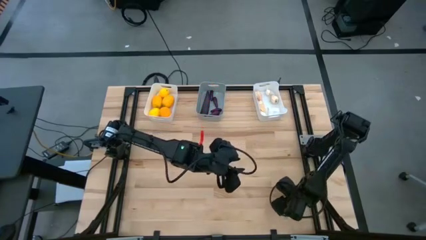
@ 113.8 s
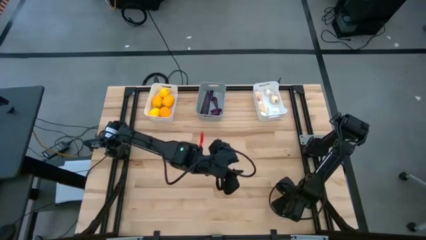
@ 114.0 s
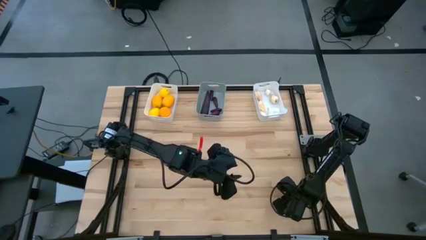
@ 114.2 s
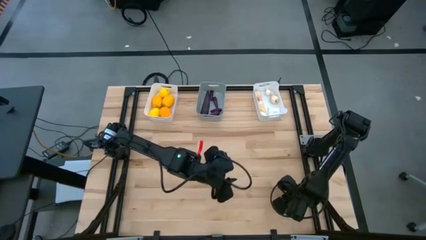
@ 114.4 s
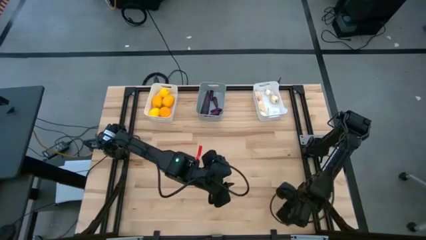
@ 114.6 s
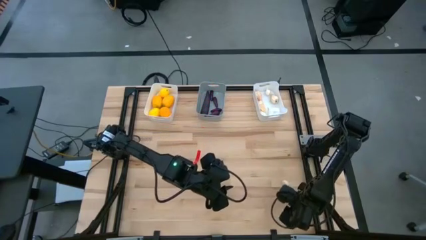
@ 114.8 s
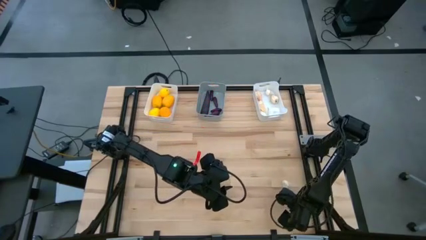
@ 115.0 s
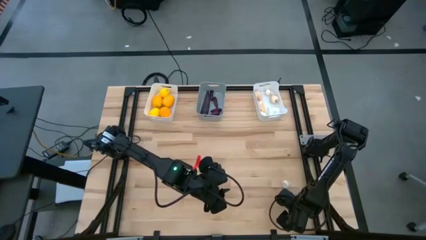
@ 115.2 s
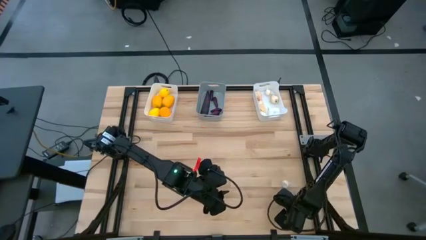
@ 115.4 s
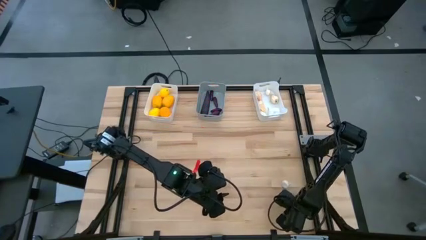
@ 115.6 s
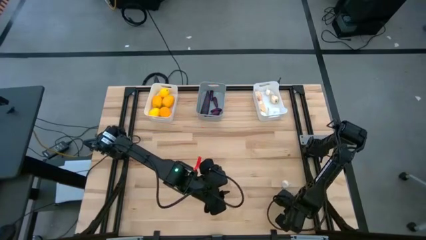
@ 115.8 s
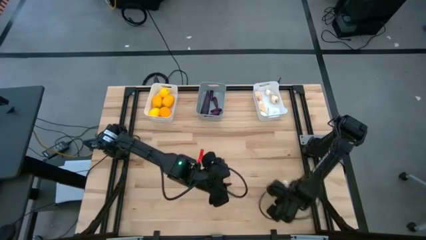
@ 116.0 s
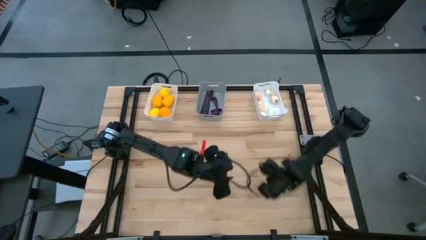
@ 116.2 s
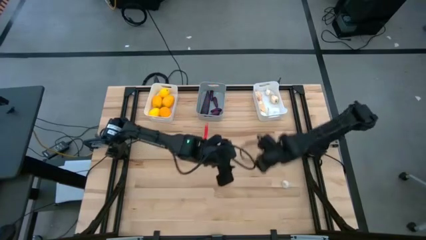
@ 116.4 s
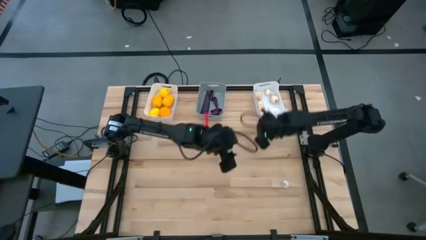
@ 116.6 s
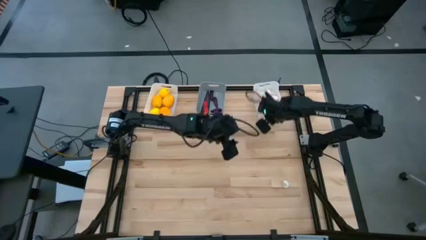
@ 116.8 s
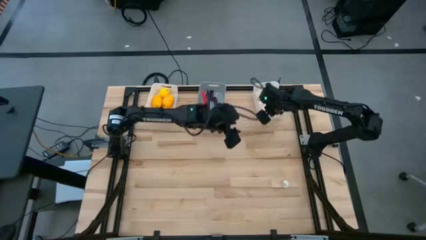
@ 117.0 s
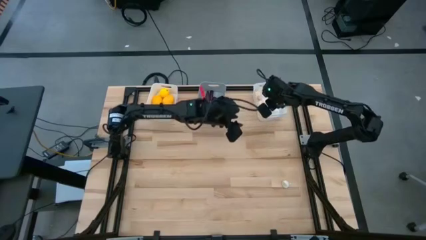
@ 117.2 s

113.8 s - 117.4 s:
Task: Sort produce into baskets
Put the garlic into the right white bin

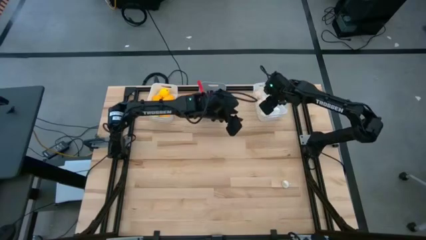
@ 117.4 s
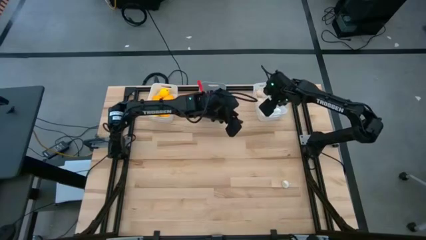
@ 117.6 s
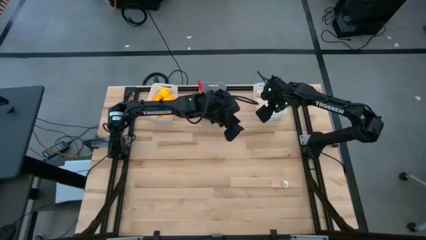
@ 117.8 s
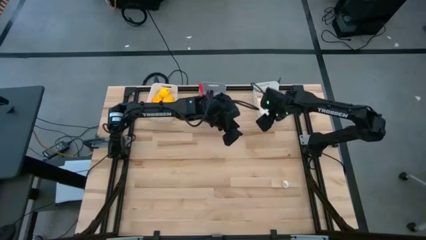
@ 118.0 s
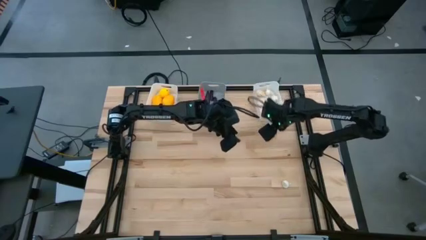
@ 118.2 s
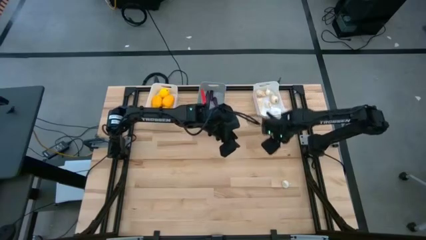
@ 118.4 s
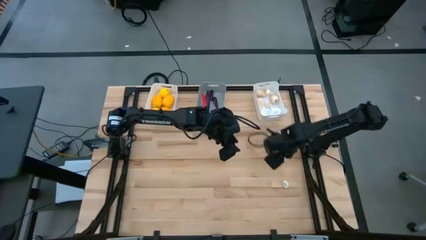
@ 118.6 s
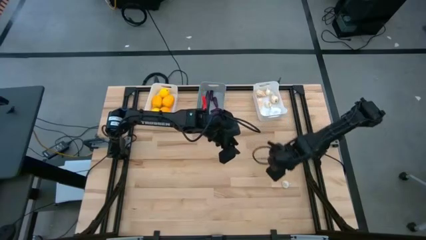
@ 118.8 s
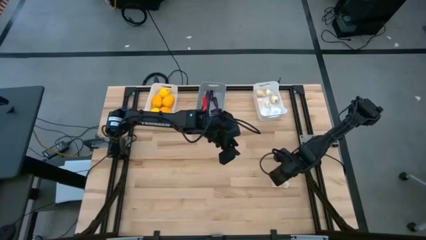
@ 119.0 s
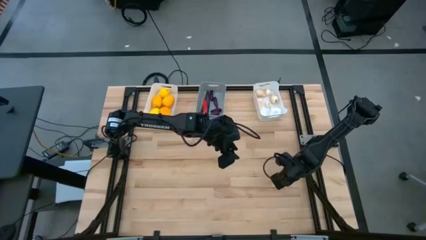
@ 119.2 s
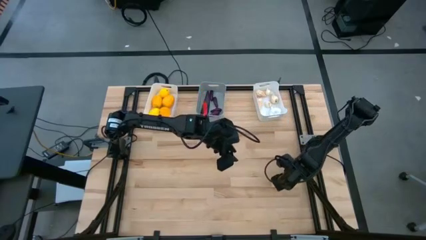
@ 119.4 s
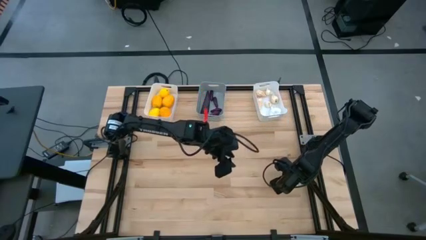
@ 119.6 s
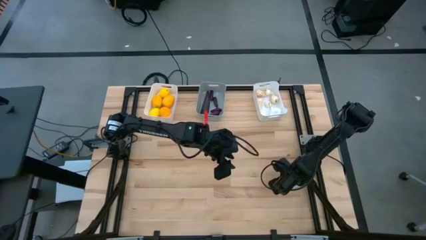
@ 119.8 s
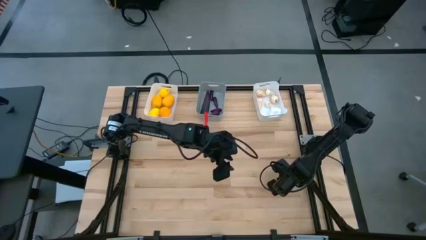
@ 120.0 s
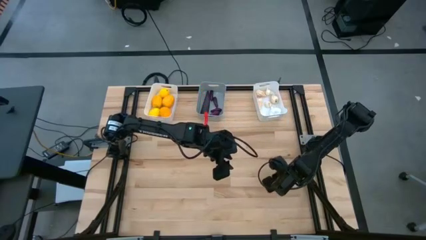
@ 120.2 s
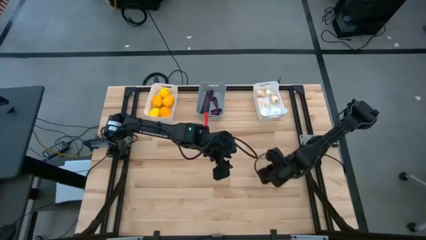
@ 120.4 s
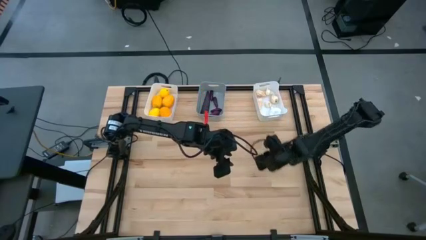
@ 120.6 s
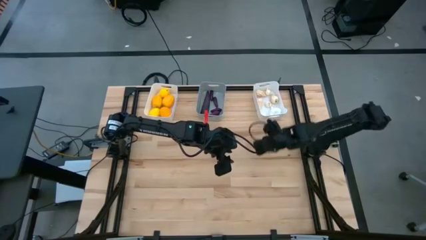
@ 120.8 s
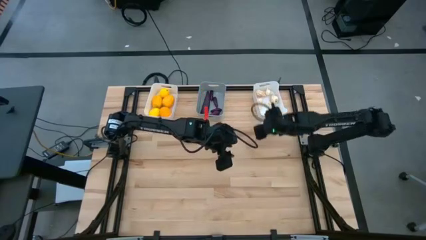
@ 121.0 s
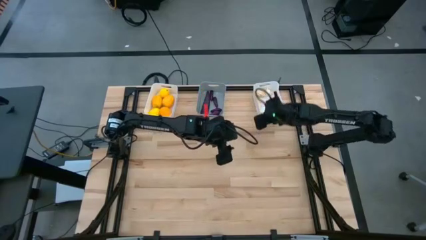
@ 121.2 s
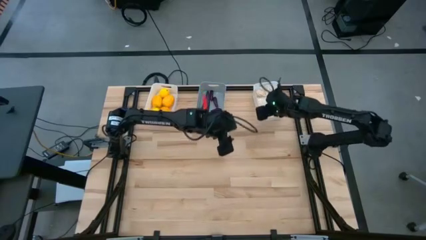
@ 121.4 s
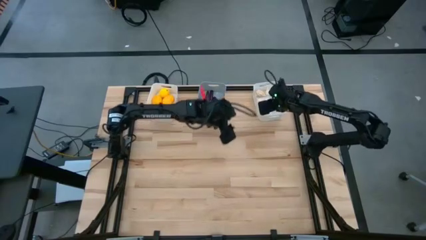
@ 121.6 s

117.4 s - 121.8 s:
Put the garlic into the right white bin

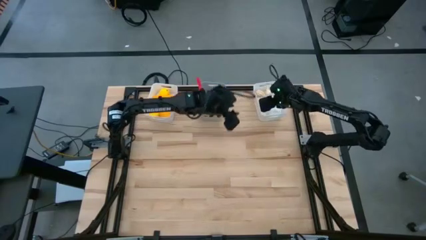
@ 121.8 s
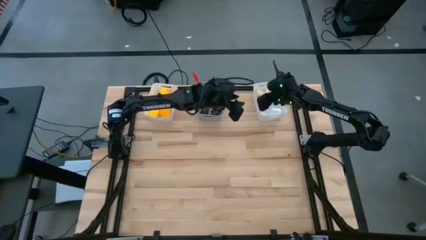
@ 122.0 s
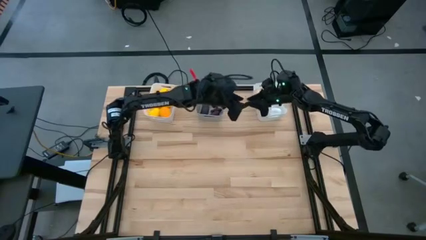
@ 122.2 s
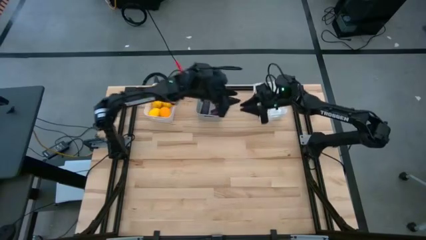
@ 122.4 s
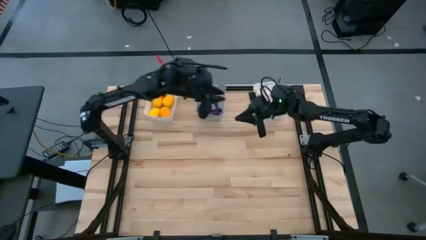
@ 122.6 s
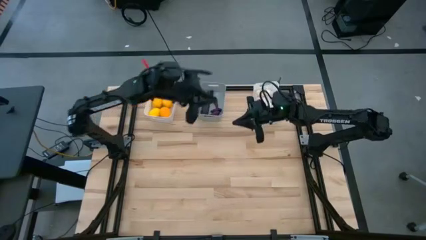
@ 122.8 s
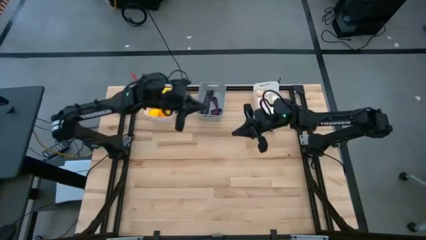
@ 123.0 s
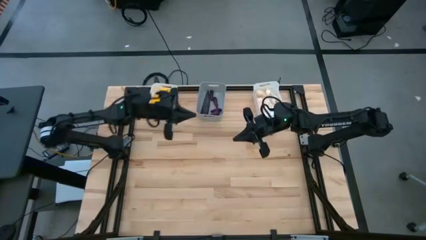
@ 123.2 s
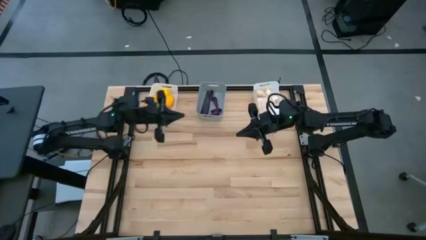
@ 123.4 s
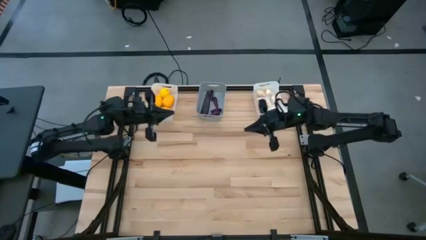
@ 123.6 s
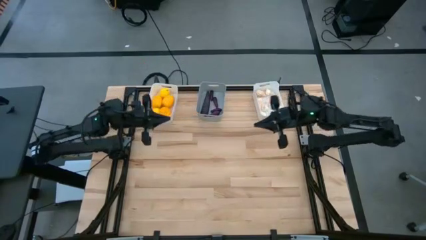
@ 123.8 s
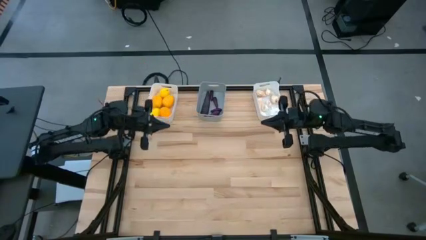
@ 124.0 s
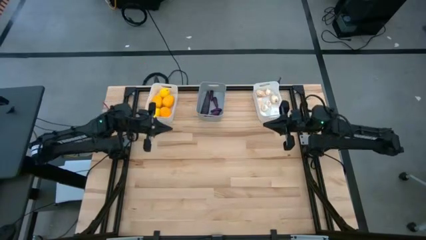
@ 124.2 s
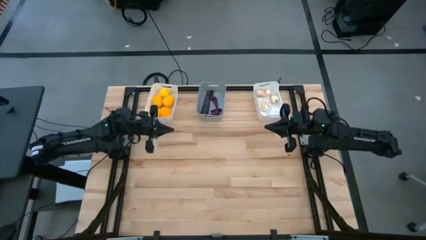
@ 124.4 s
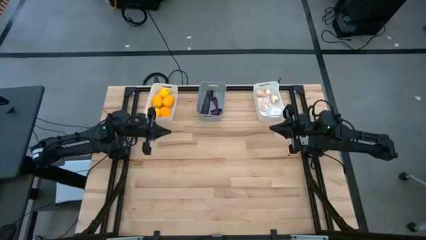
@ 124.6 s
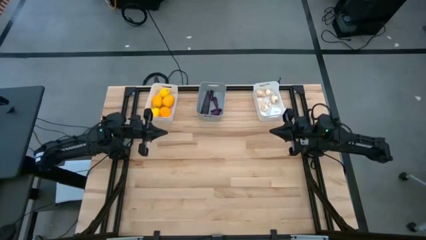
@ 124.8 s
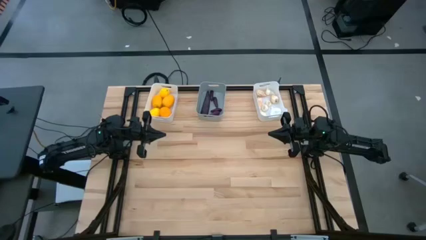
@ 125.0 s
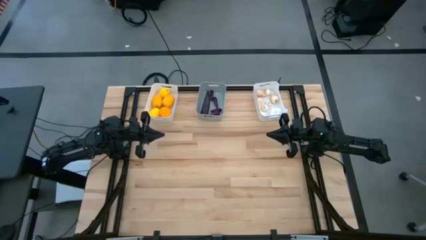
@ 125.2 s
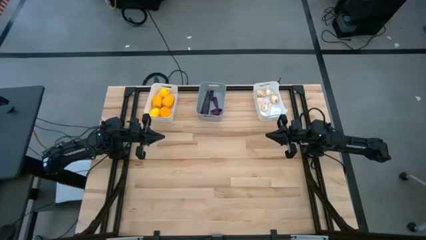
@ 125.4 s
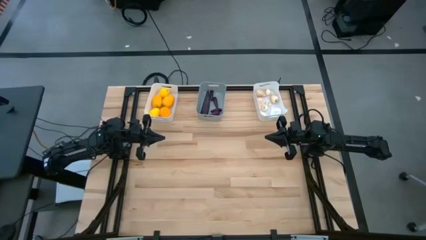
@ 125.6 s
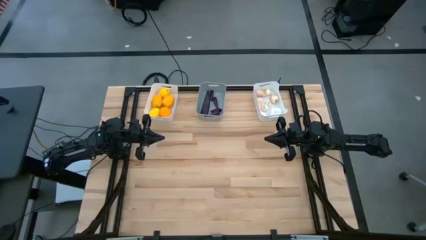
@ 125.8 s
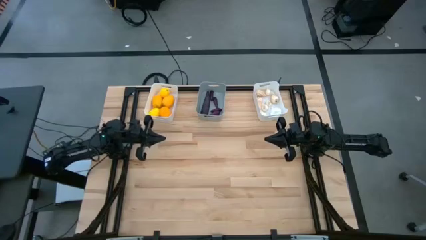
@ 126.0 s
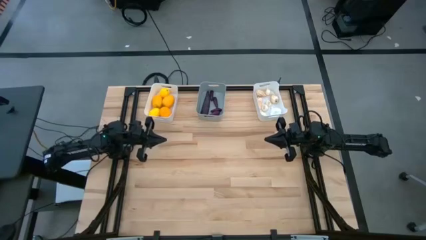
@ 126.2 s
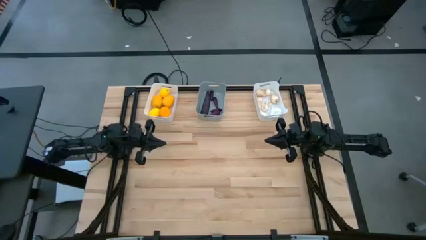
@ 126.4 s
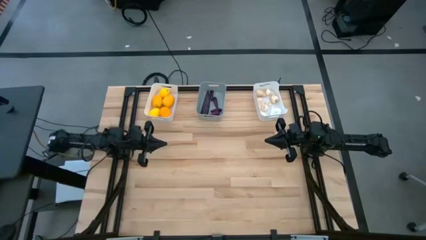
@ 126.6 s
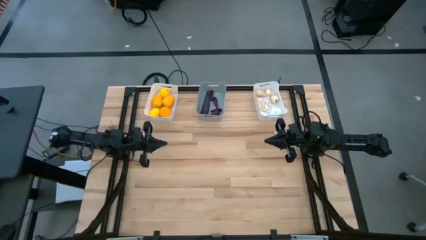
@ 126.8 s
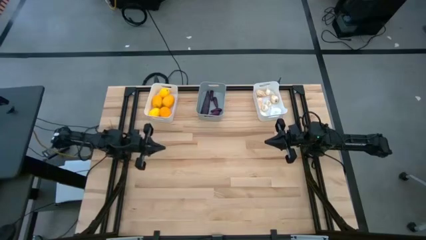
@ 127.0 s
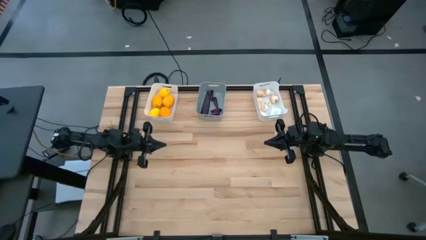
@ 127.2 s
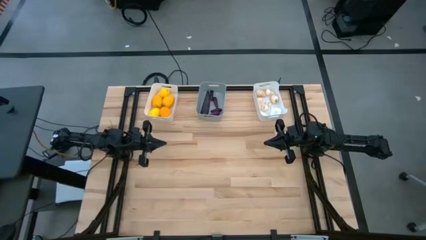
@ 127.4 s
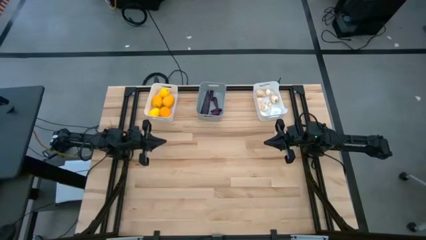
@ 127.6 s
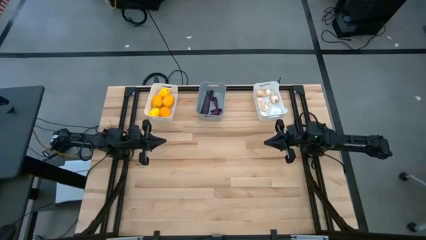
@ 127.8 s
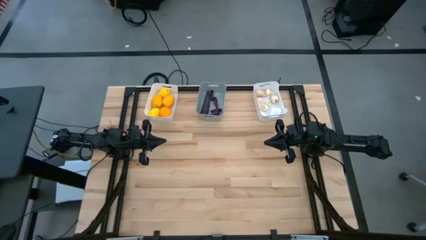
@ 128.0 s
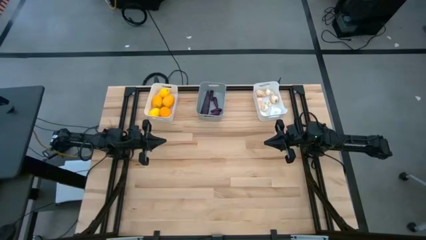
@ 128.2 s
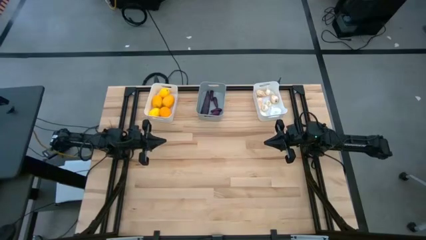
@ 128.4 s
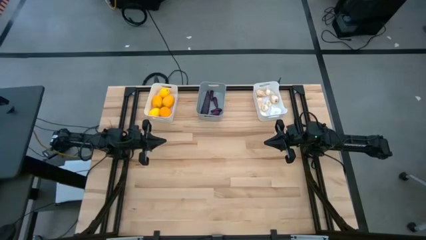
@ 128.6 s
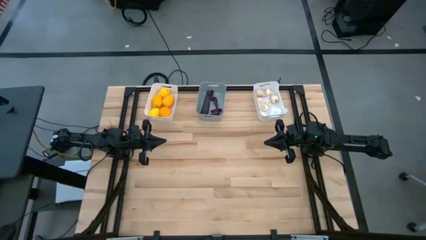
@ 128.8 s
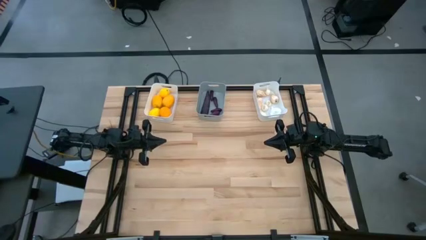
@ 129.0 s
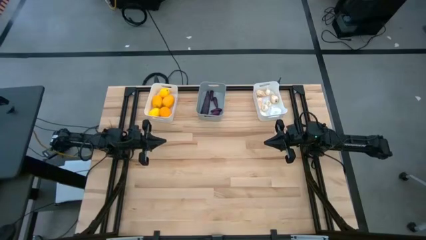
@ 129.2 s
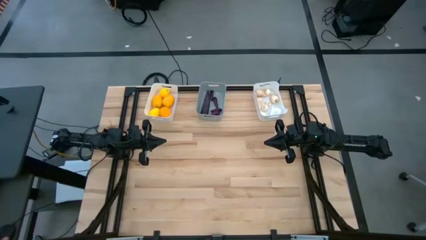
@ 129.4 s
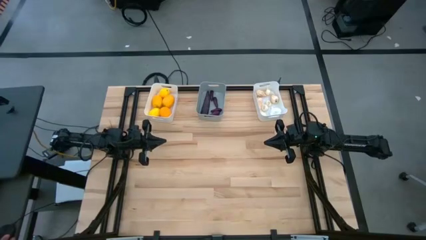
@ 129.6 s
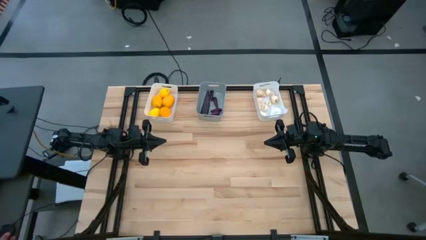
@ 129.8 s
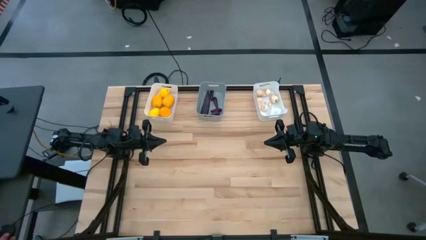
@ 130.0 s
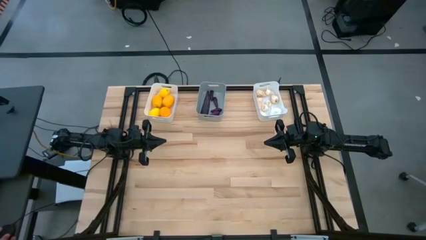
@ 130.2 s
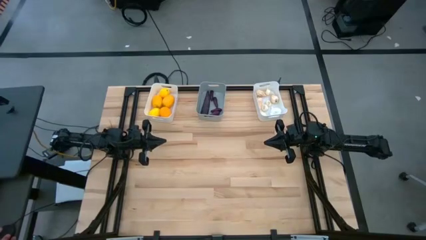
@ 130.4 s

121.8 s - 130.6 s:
Return to Home Position
